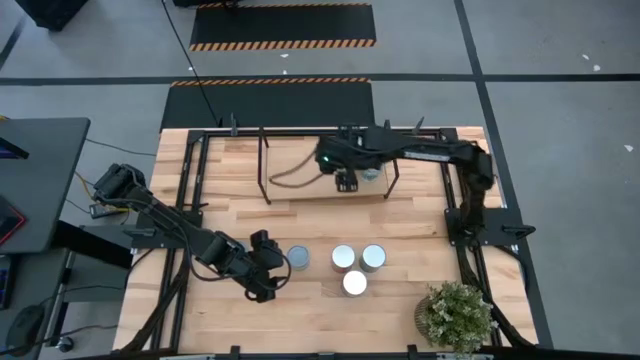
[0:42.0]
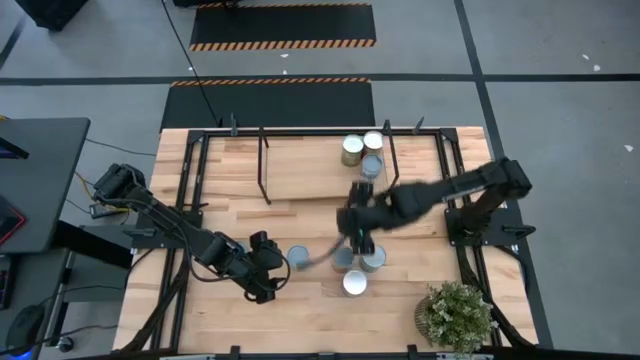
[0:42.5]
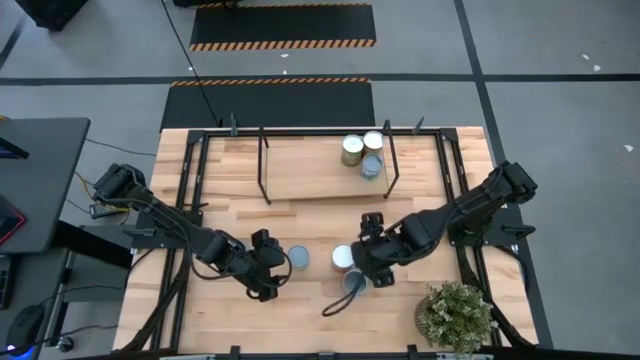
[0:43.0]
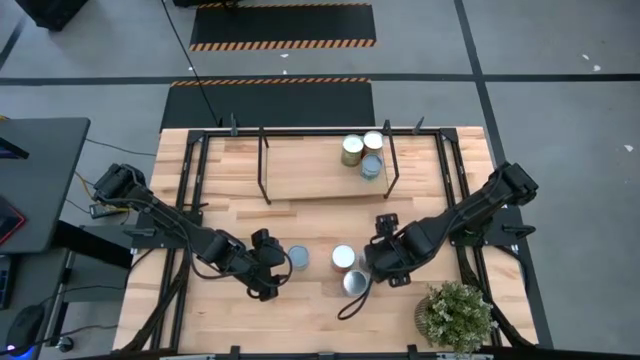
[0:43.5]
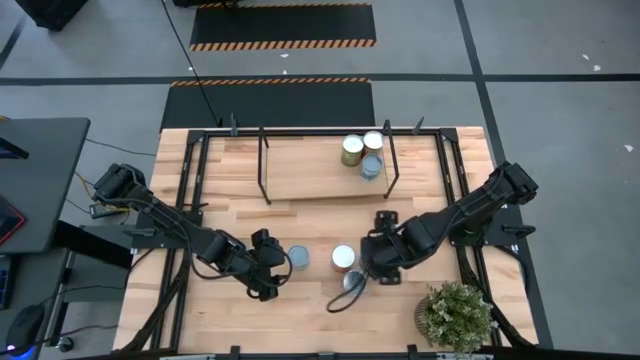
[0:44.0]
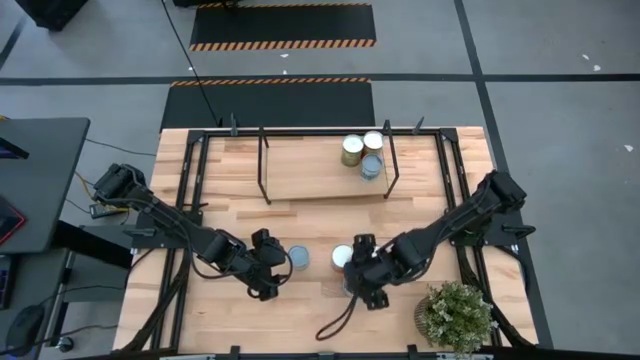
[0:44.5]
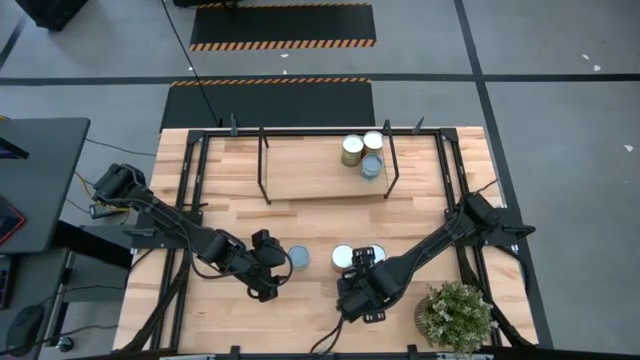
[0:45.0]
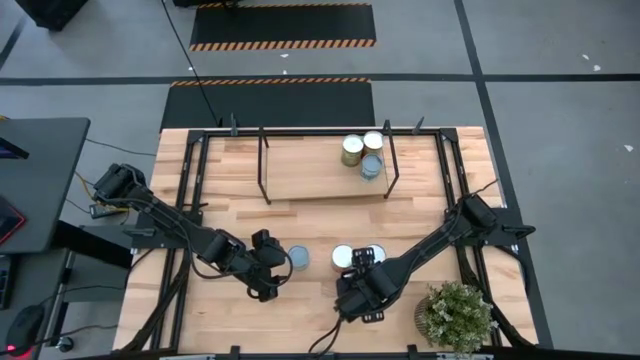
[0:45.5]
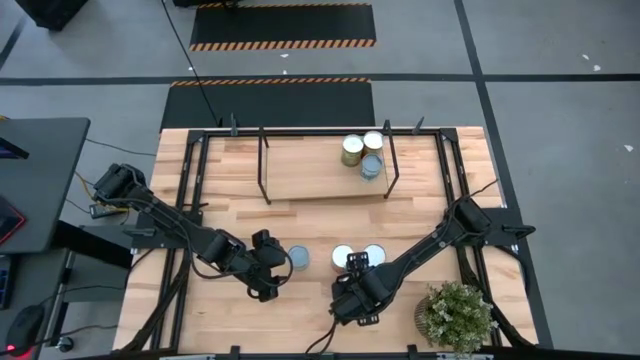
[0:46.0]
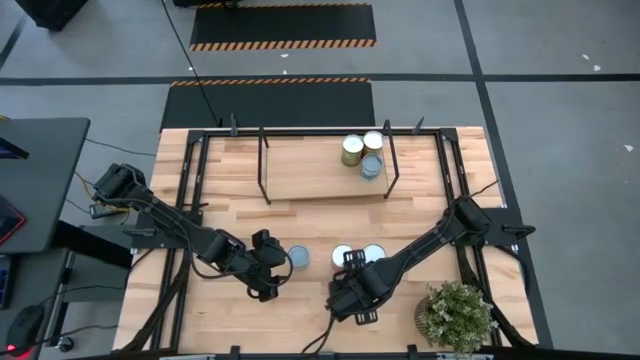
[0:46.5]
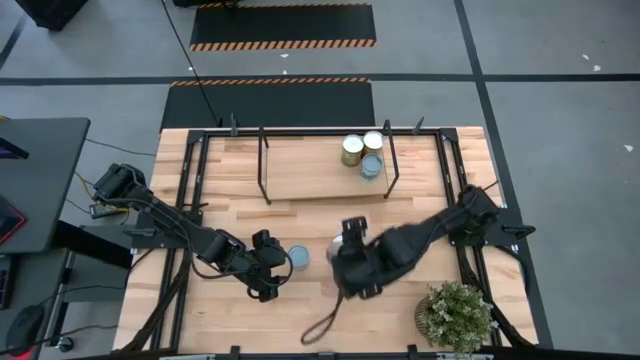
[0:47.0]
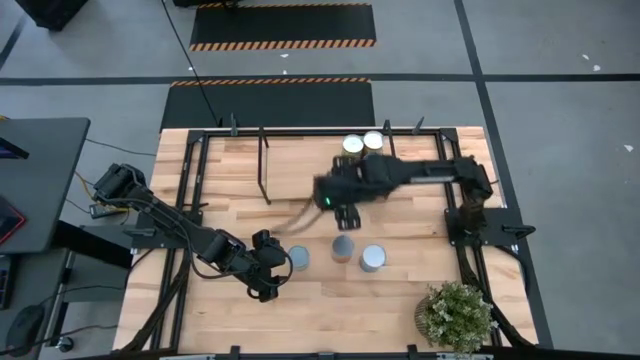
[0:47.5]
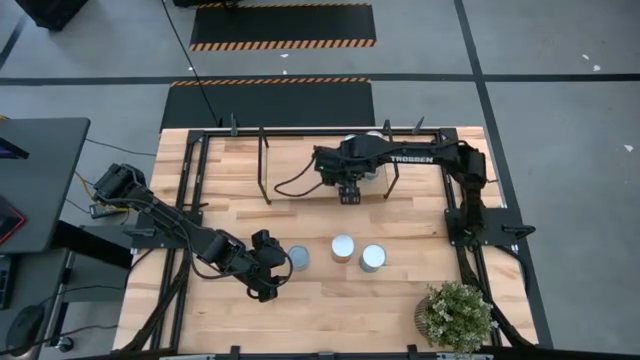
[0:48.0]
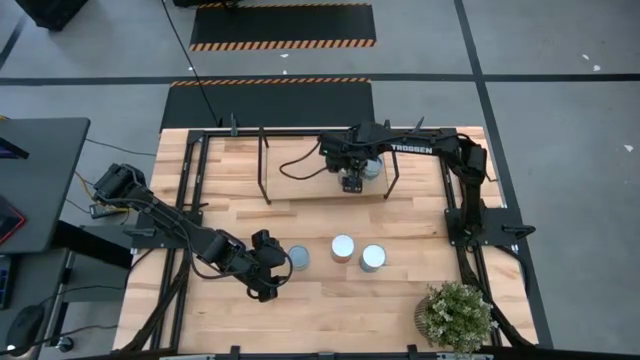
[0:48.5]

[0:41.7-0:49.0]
Task: Pick and place cans onto a shelf
Put the canned peaches on the shelf

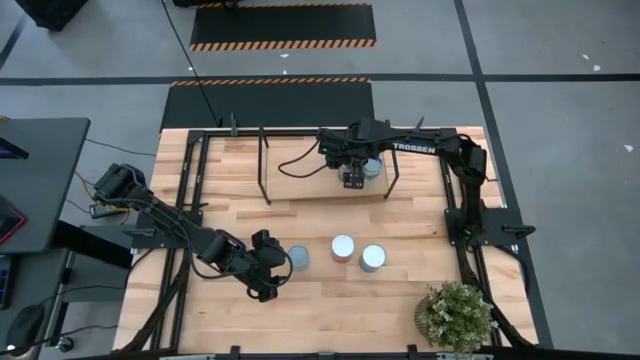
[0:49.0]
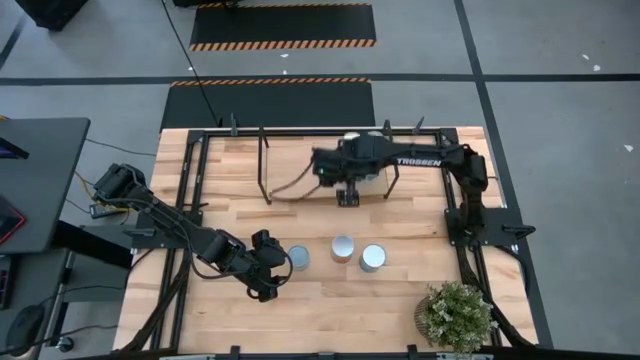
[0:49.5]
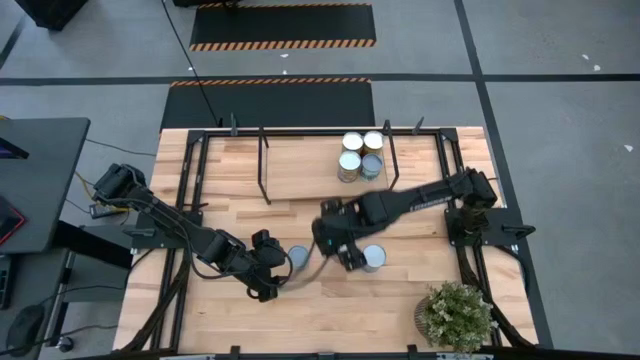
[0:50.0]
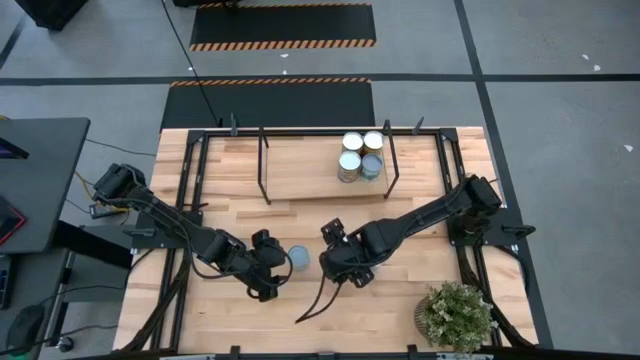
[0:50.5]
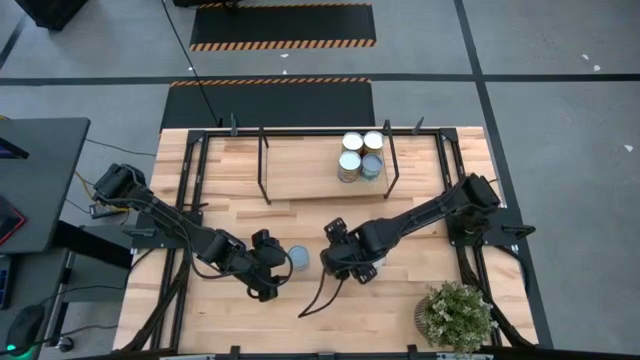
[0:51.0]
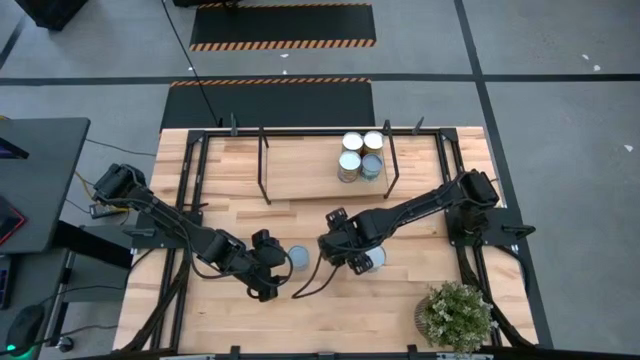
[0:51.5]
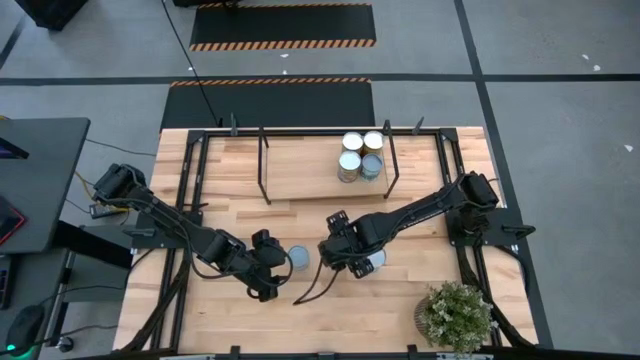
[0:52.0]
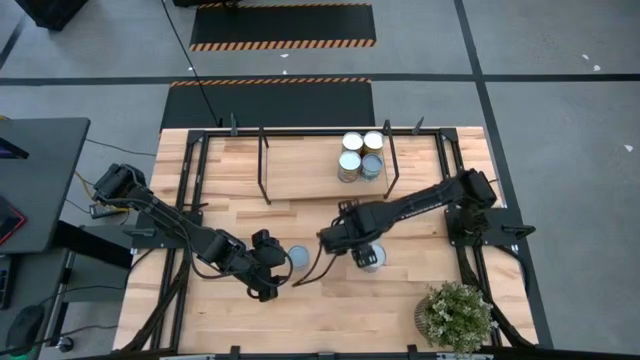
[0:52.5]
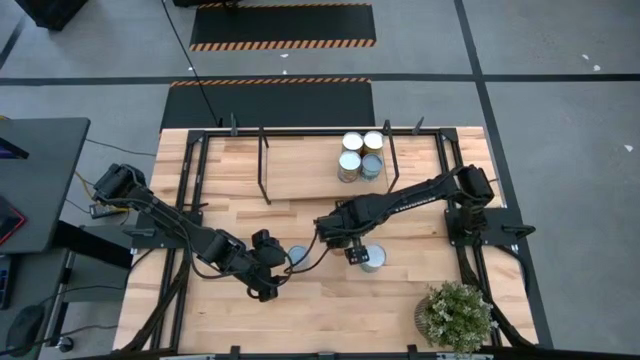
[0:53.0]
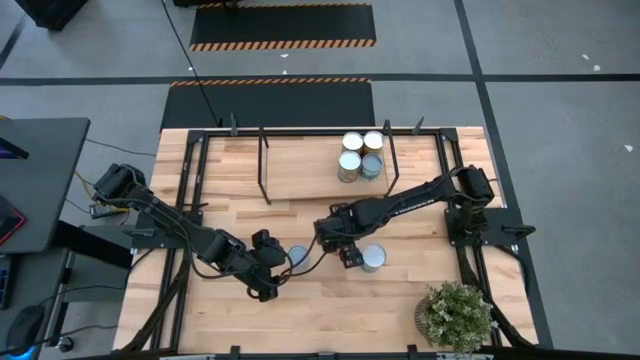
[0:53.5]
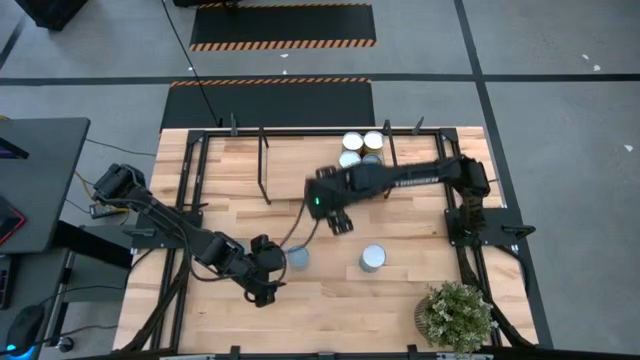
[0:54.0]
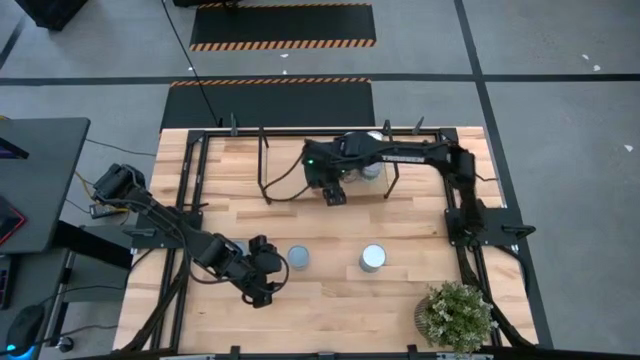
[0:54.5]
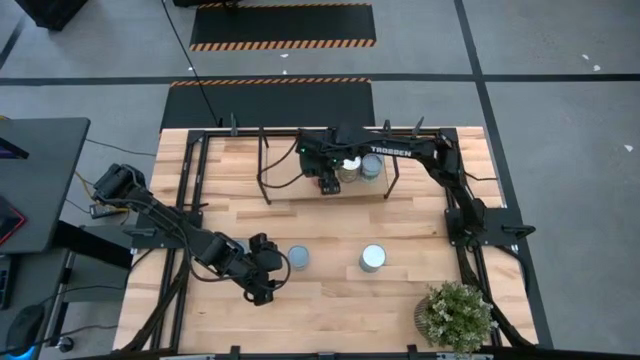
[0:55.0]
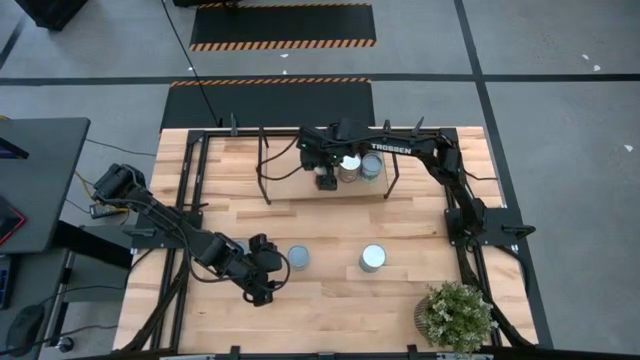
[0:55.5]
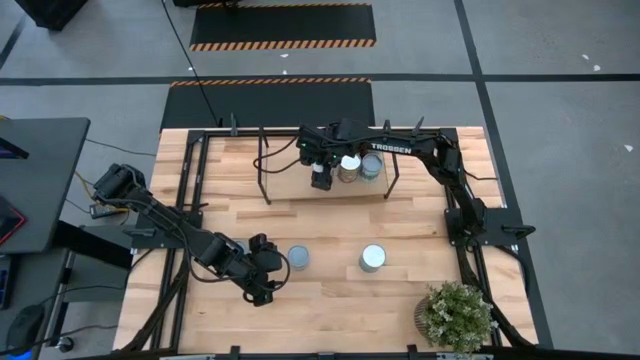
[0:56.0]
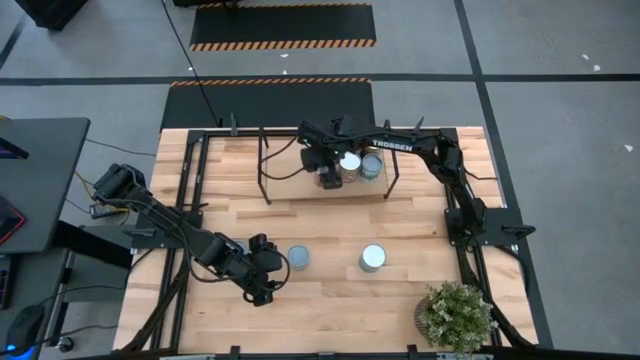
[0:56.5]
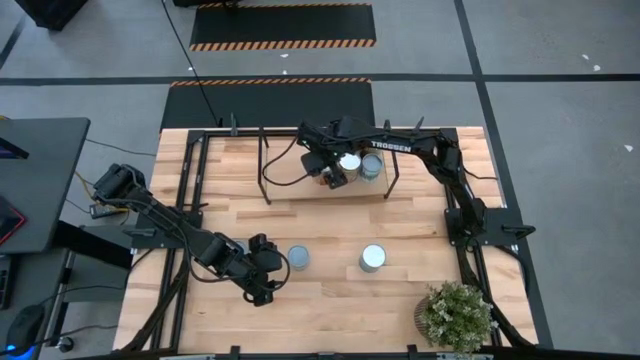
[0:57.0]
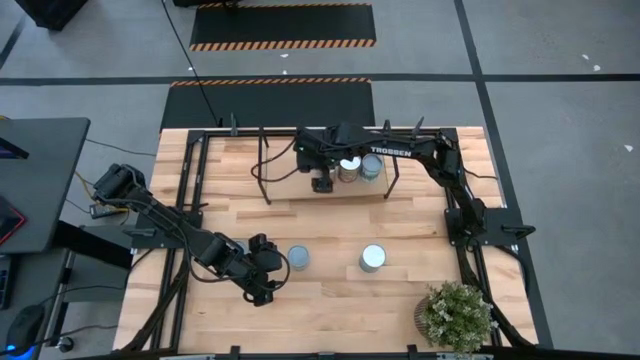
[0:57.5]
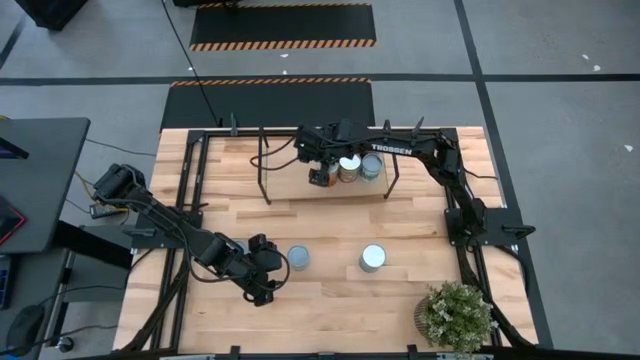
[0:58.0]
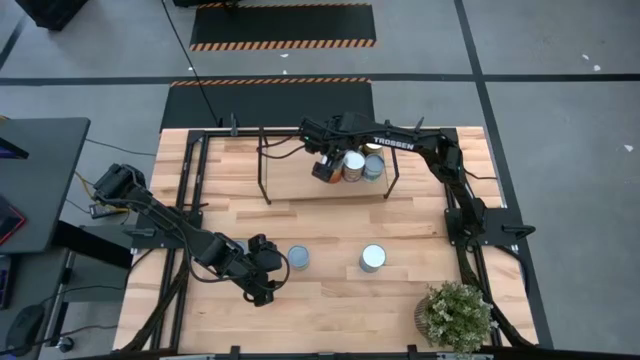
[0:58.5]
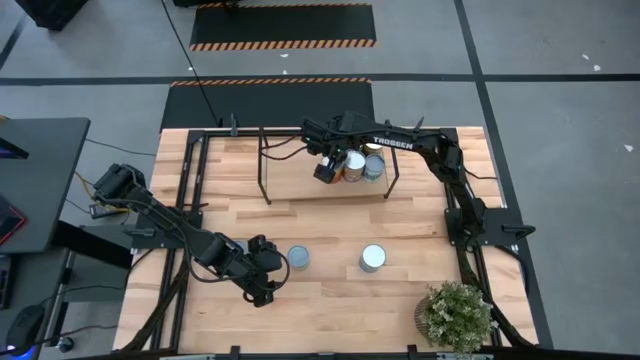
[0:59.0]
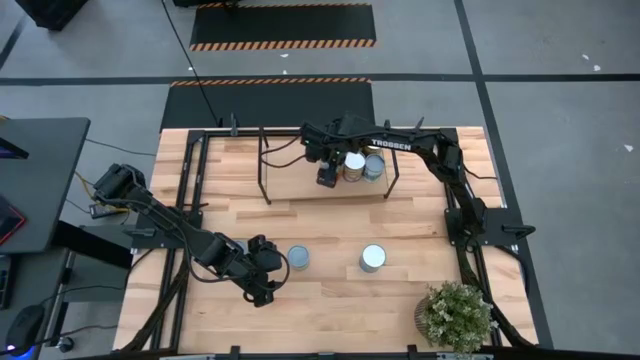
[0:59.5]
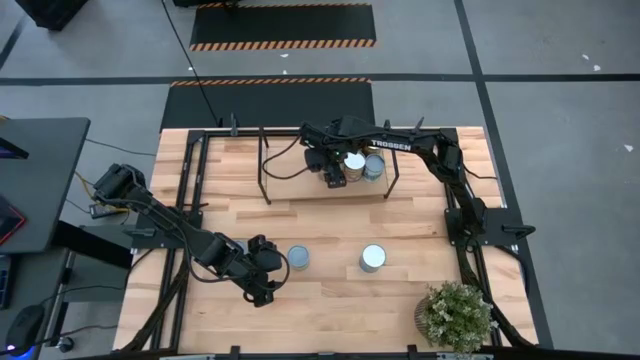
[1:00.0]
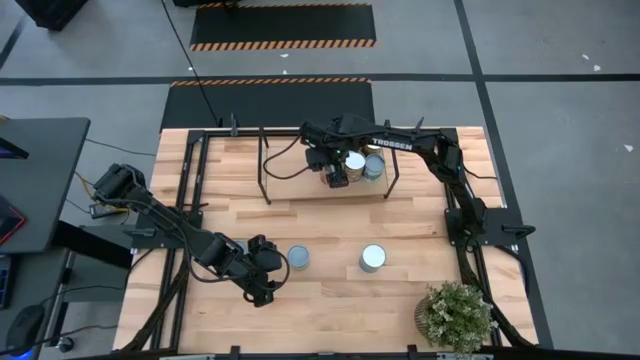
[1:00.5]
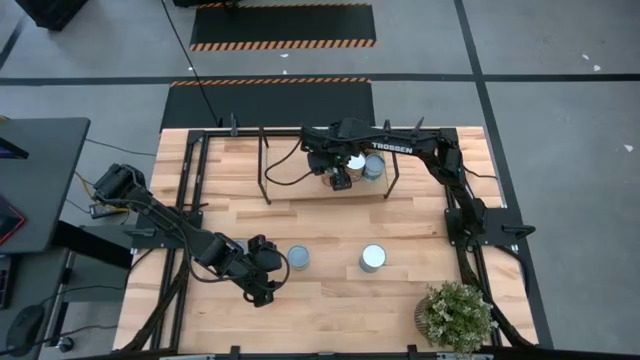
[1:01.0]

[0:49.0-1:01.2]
Put the canned pineapple on the shelf

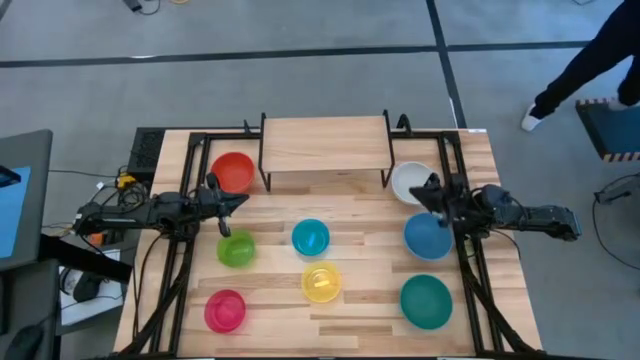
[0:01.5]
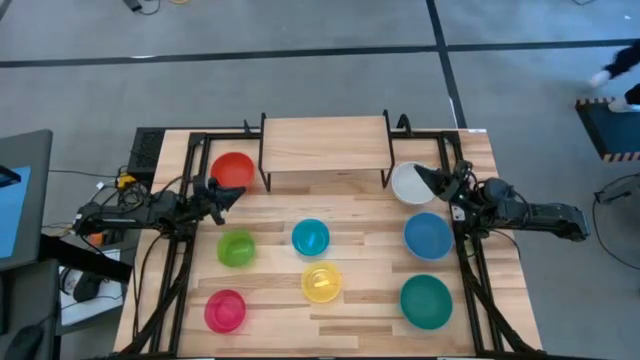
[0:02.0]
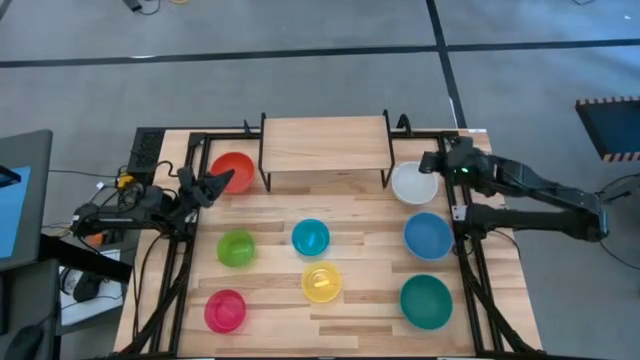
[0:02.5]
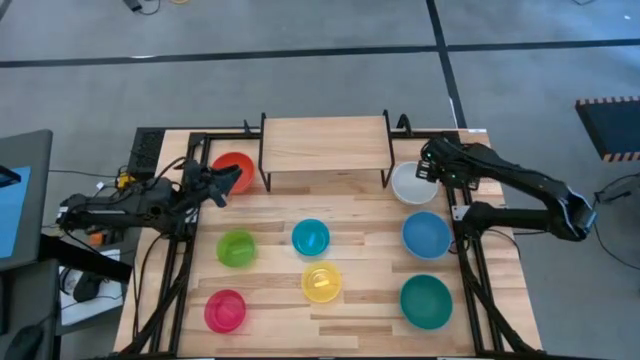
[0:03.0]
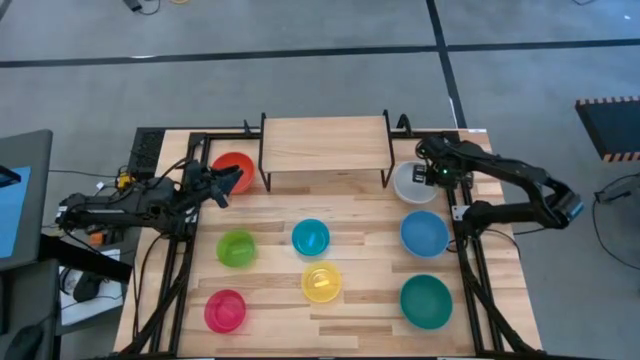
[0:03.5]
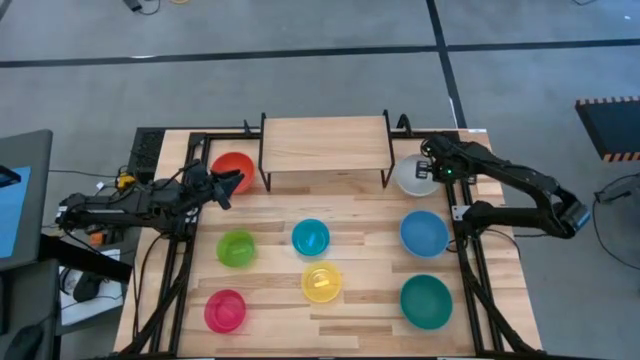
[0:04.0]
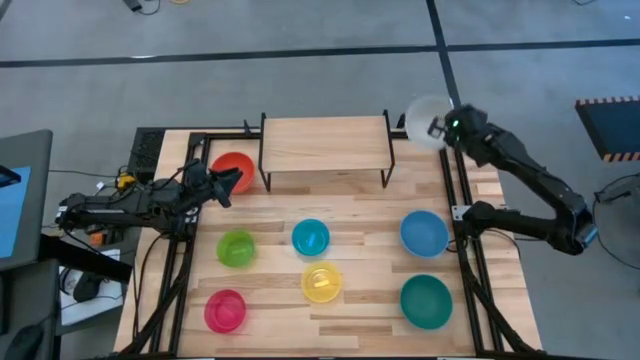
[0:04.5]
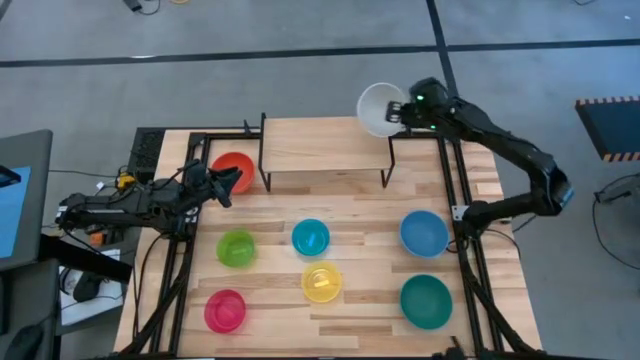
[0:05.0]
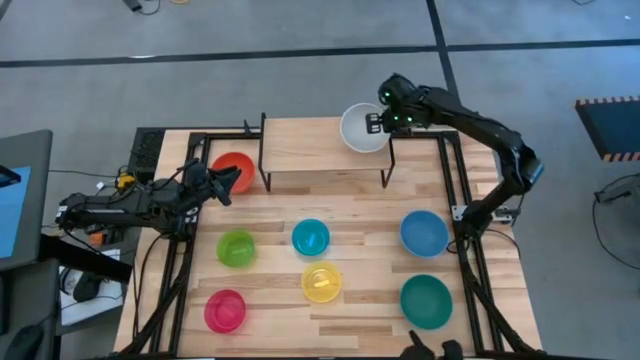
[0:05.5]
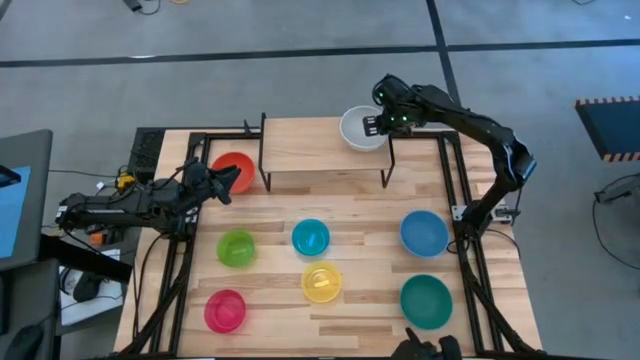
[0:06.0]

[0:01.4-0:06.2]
Task: Place and stack bowls onto a shelf
Put the large white bowl on the shelf
